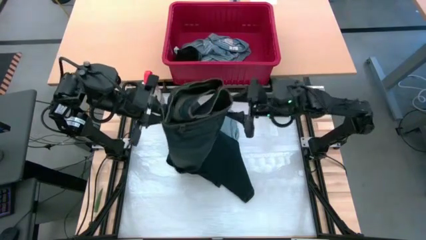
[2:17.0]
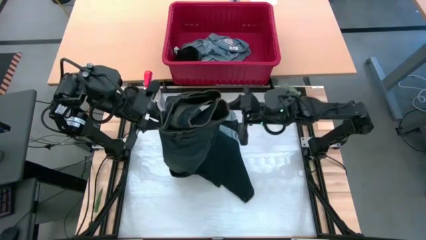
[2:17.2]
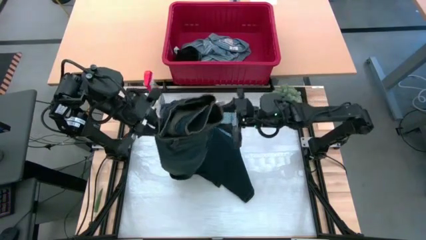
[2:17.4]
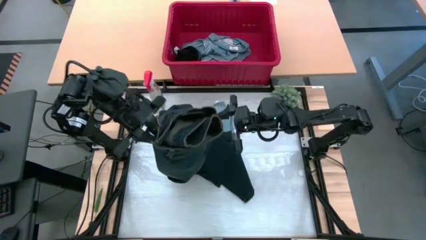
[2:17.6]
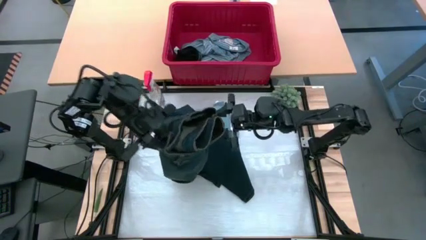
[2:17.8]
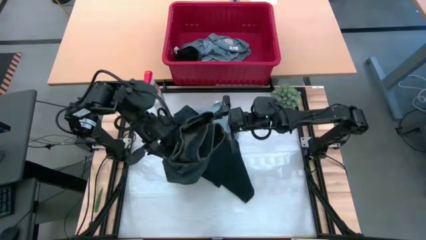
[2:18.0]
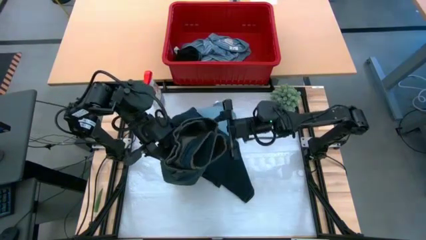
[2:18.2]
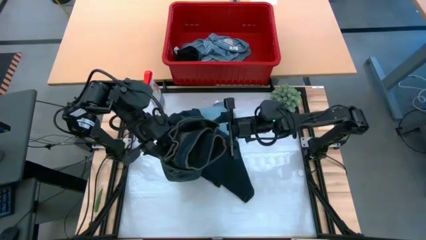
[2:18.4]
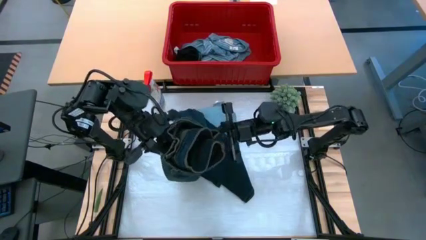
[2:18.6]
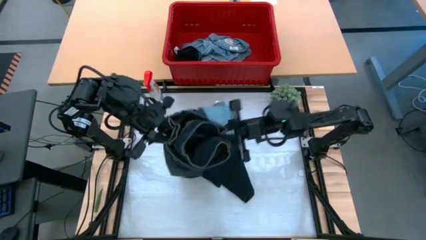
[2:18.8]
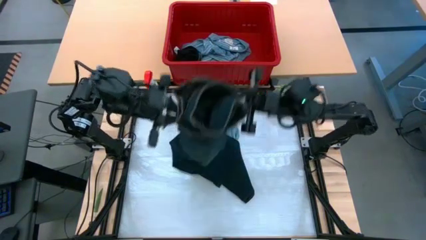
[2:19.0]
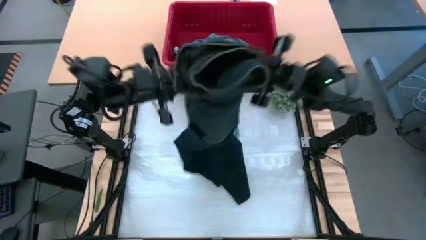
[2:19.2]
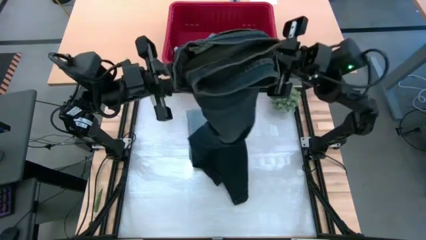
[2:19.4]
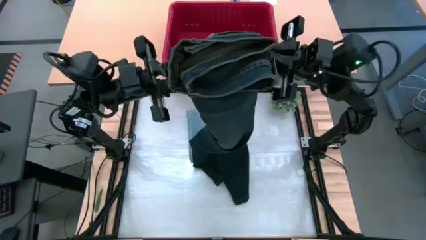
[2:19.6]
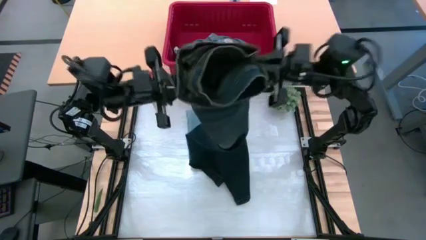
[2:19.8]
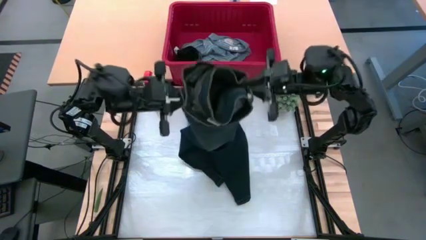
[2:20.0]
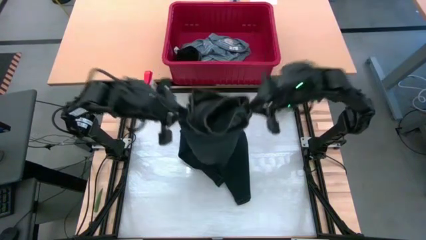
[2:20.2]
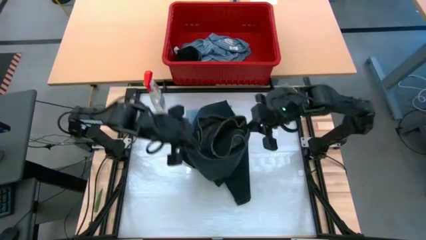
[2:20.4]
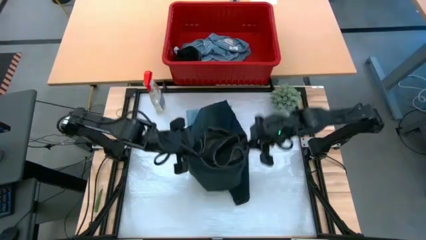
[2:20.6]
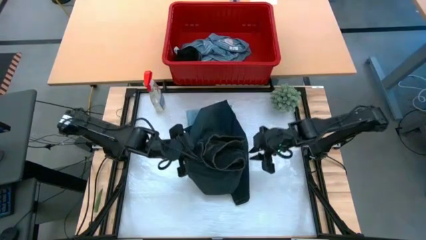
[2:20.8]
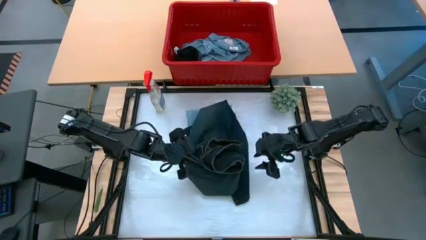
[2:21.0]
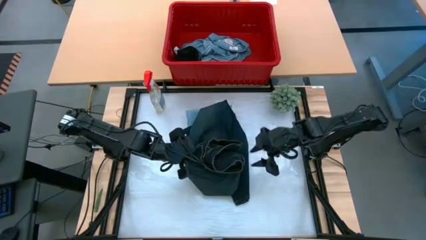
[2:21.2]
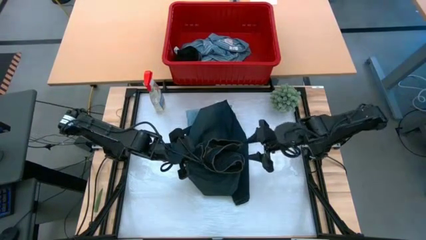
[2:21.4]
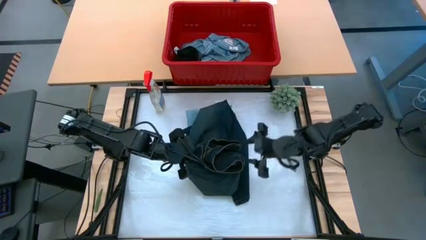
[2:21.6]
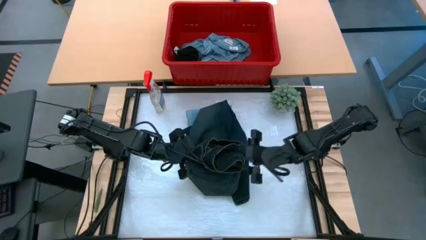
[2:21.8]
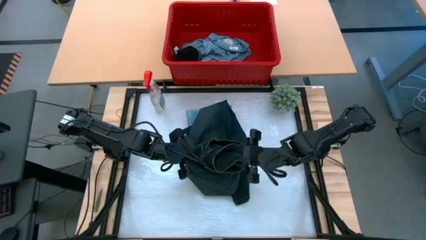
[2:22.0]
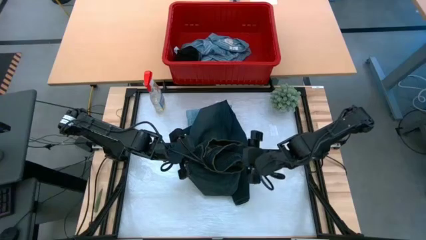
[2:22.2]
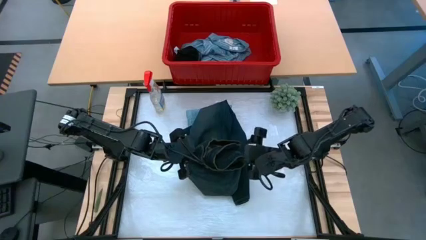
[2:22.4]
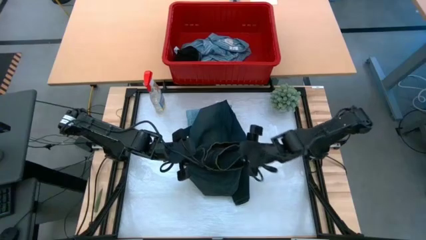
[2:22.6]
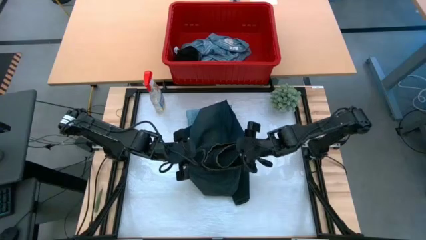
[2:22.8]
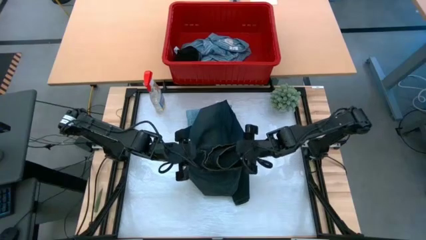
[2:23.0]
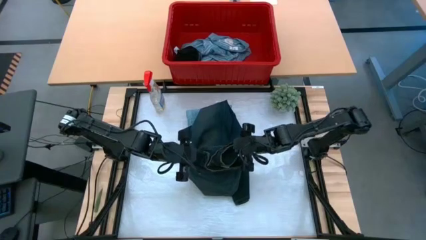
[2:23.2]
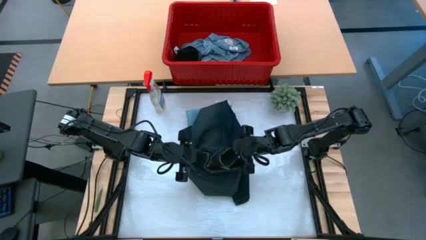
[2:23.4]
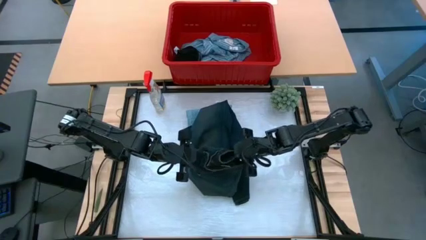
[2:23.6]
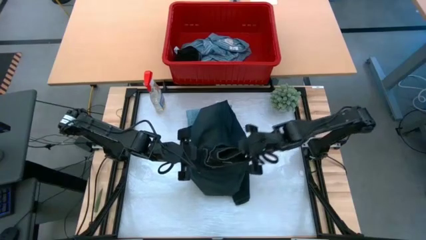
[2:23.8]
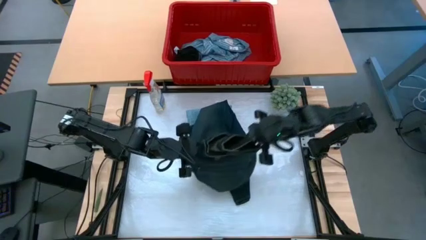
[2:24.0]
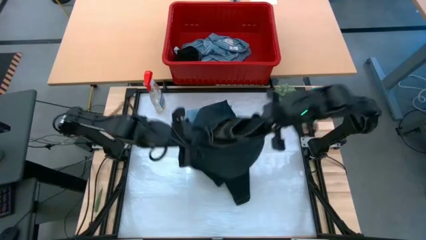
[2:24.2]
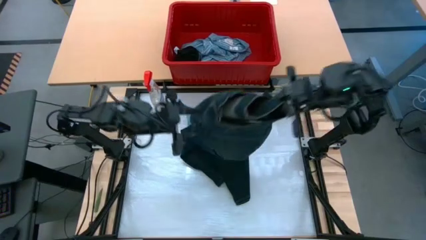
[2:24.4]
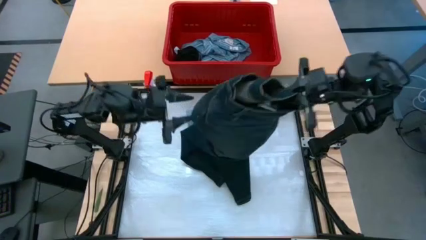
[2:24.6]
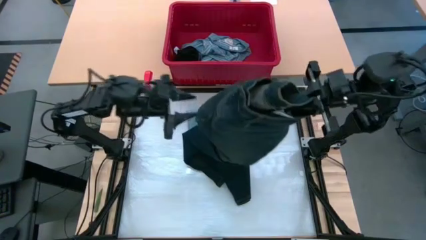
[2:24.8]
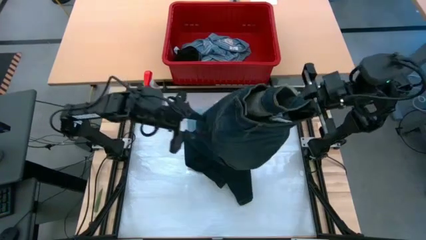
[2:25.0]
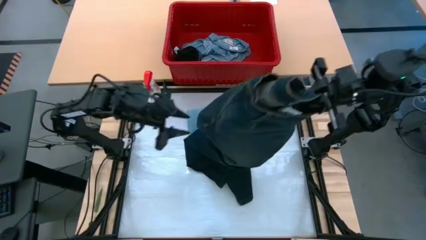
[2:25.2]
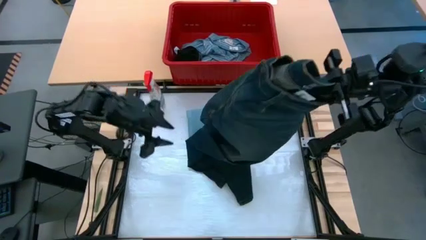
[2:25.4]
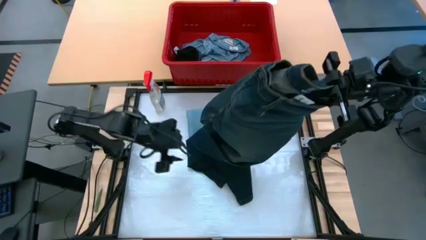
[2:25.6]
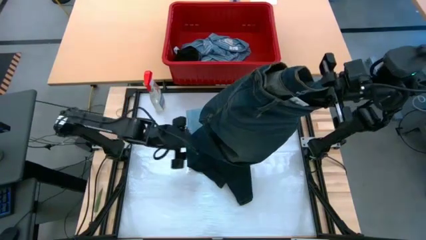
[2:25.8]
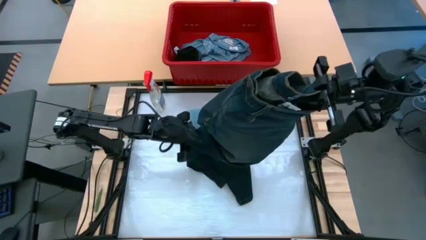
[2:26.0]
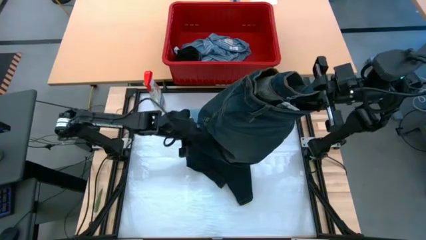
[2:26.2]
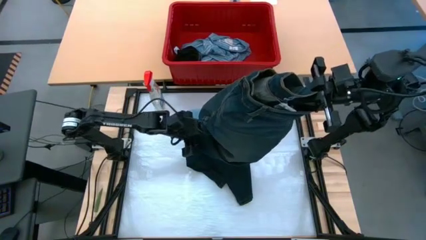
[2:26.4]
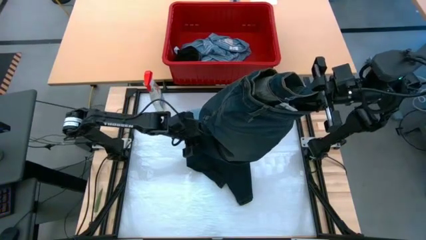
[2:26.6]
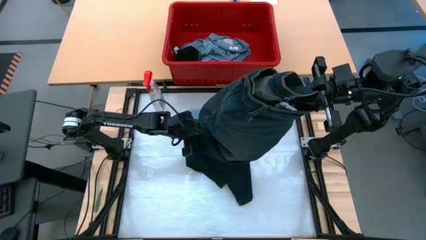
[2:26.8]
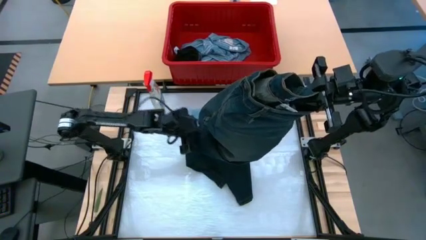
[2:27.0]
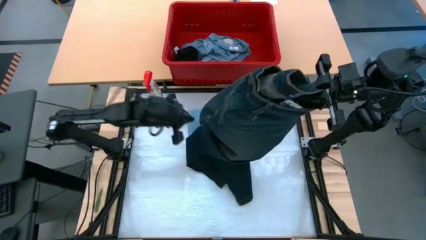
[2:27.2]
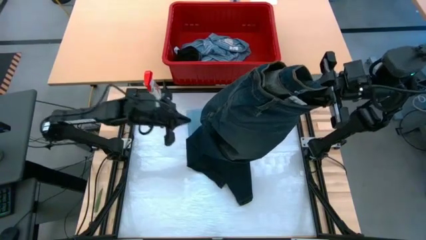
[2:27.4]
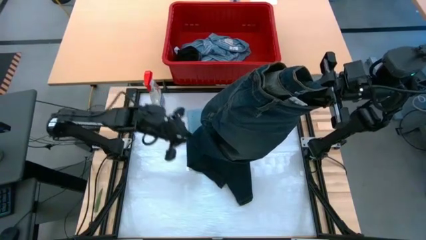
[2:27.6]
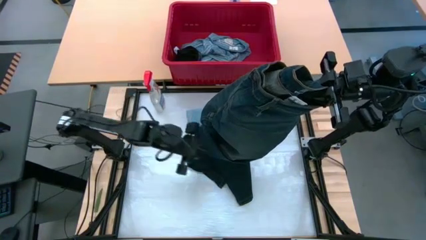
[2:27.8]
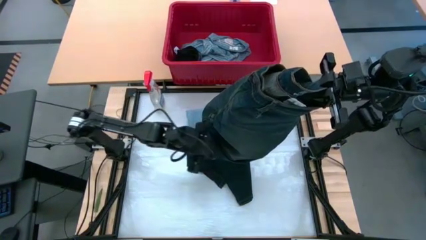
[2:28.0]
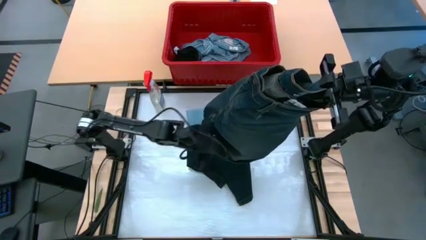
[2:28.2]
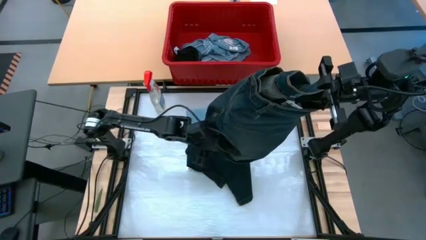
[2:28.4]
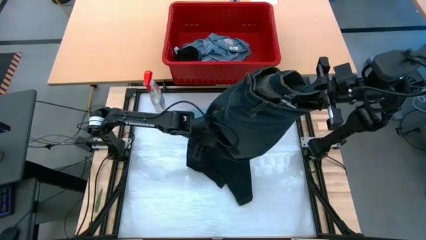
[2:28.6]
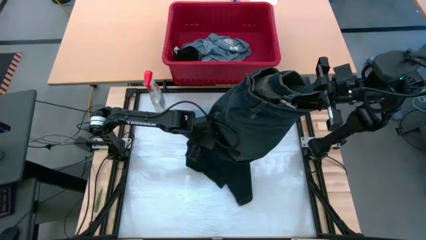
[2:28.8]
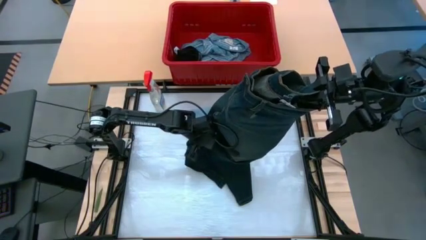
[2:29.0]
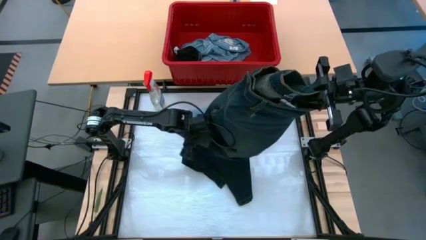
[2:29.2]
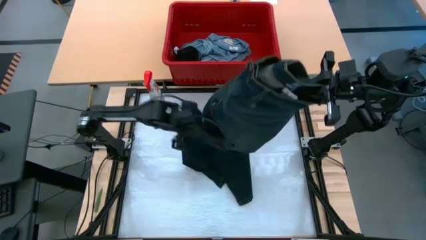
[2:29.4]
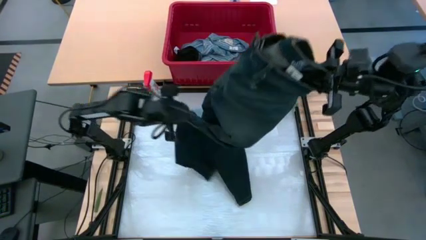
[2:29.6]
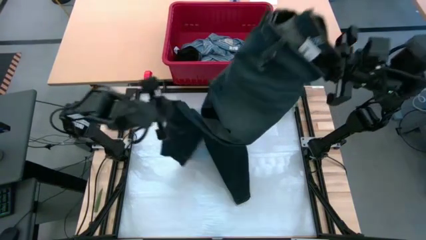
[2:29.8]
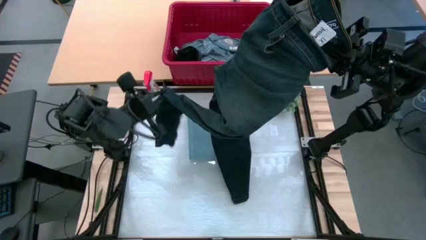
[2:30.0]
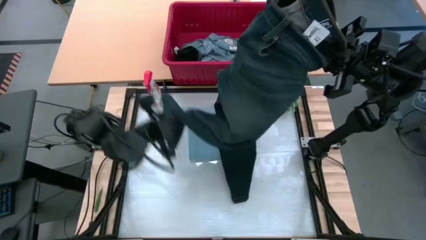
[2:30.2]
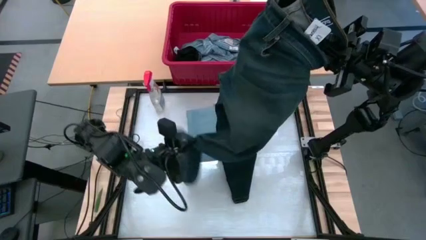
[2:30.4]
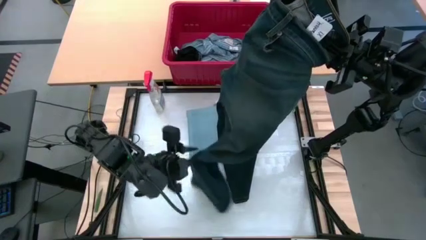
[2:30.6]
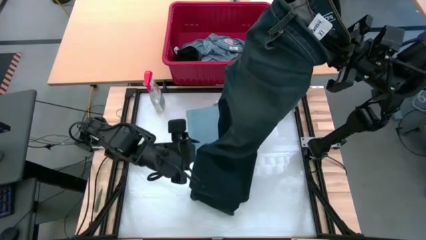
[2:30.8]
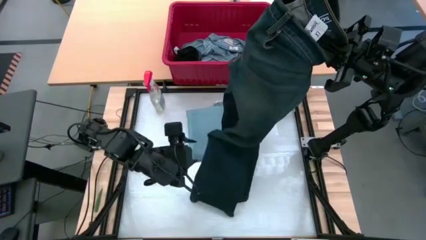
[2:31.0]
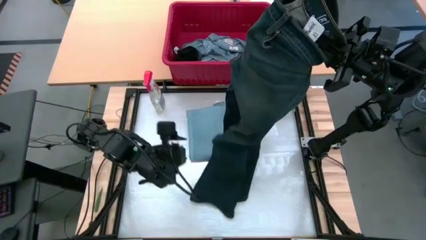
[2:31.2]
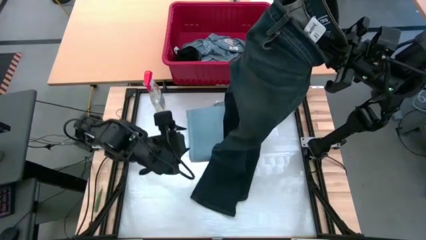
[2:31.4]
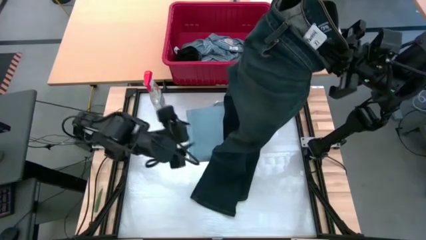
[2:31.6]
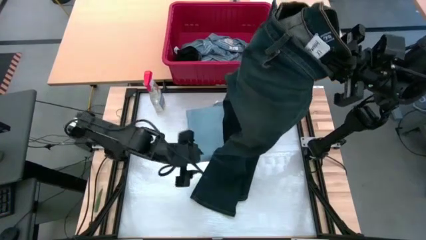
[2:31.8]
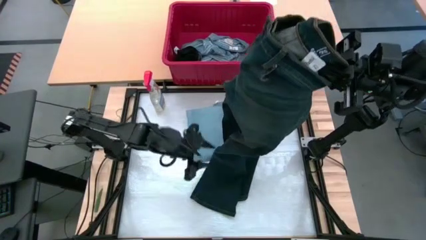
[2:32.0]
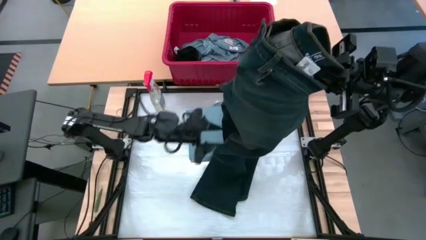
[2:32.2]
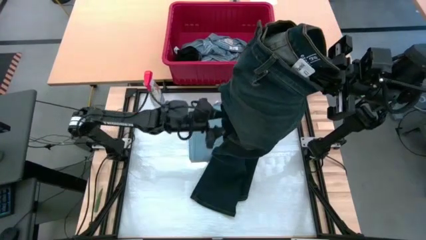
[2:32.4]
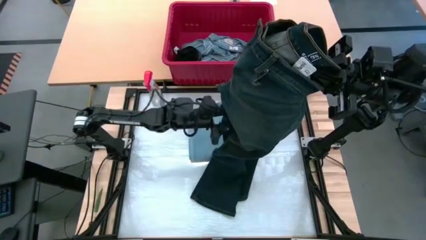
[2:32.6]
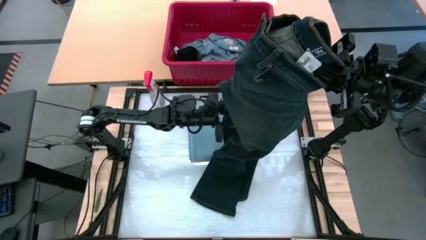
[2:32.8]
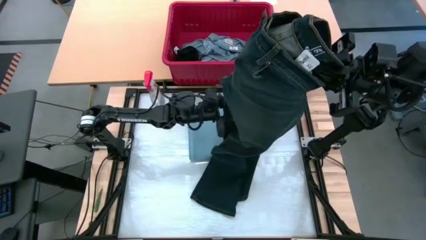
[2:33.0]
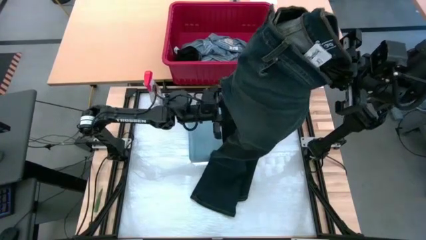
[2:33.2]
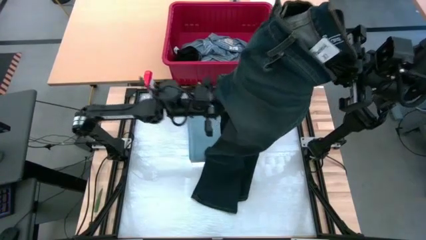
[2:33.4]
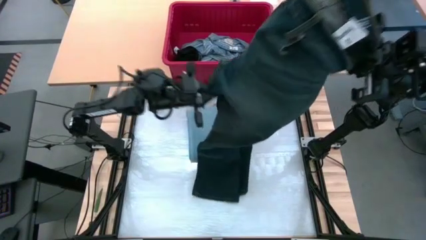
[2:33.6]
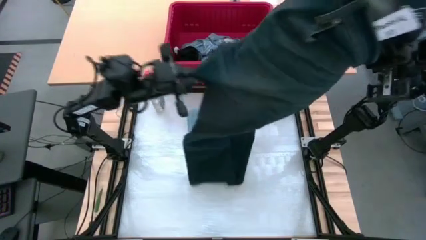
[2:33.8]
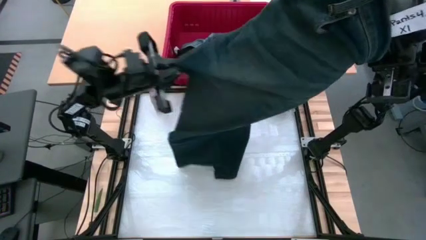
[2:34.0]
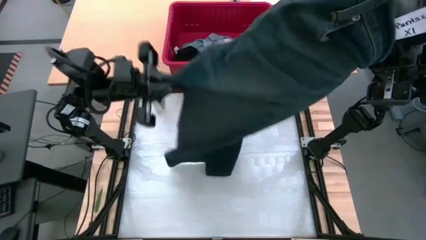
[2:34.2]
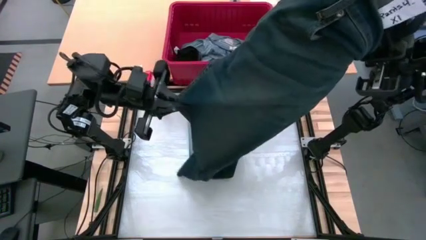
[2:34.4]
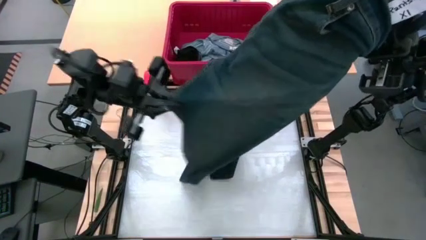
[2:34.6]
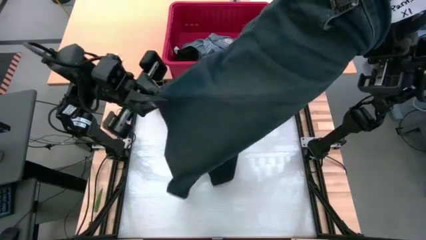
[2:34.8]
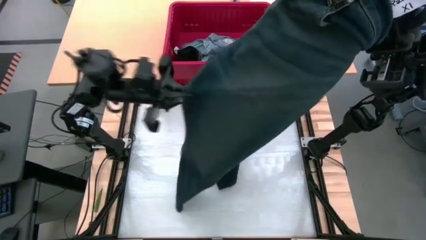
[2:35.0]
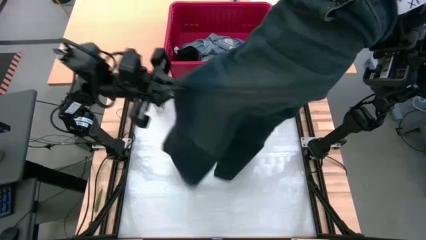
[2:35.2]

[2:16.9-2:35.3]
Task: Fold Laundry from Bin
Fold the black pants from the red laundry bin
